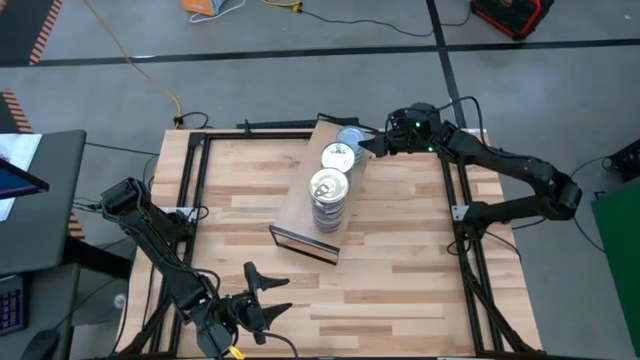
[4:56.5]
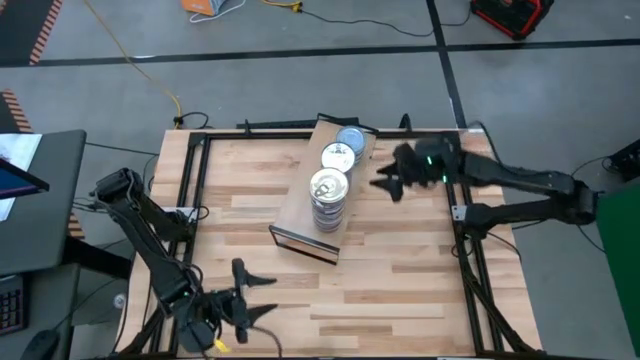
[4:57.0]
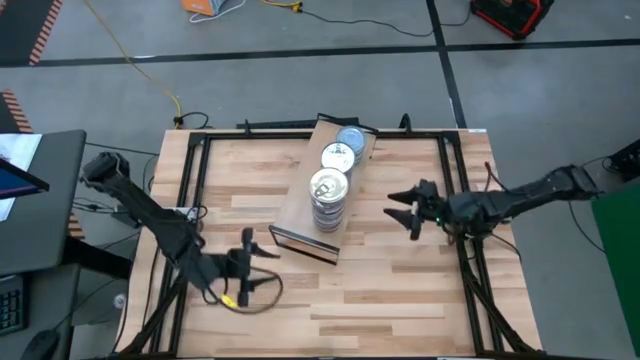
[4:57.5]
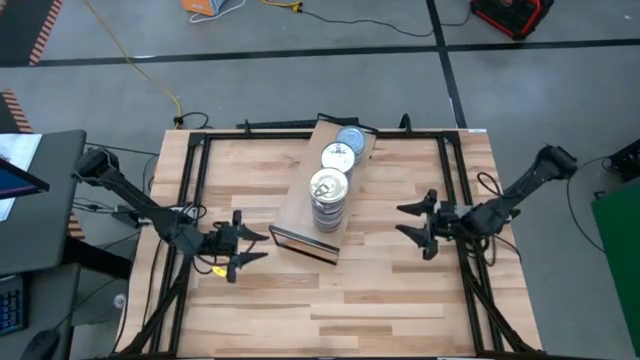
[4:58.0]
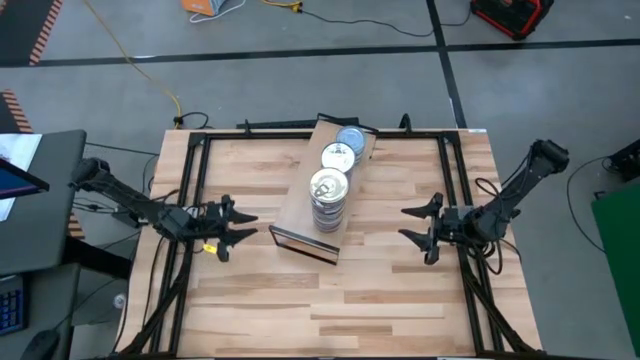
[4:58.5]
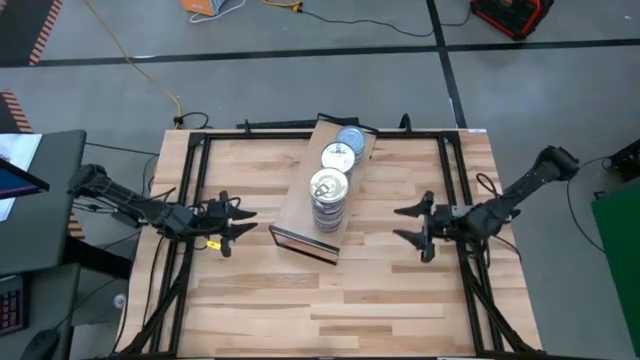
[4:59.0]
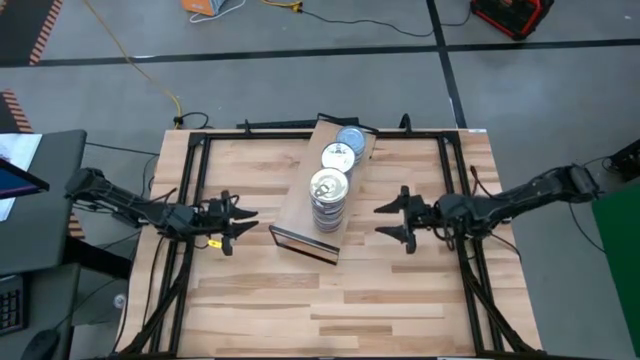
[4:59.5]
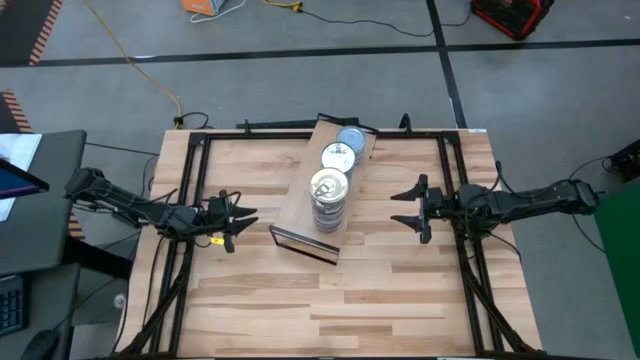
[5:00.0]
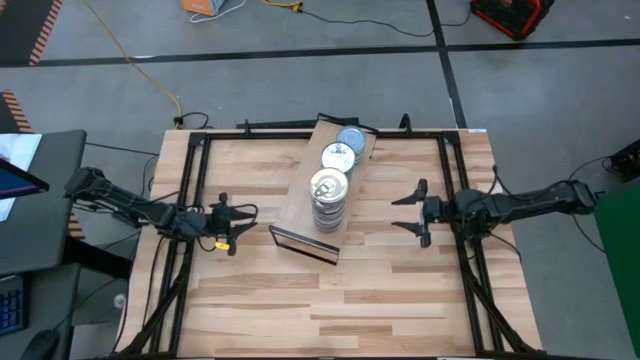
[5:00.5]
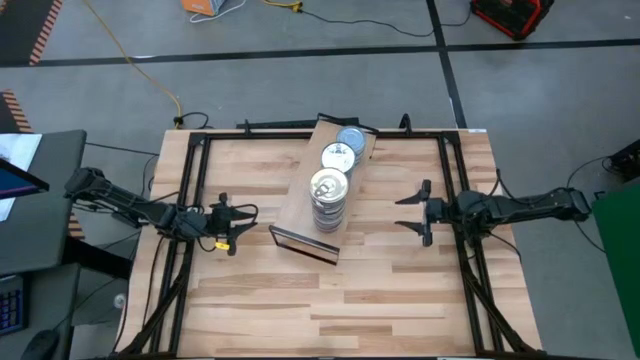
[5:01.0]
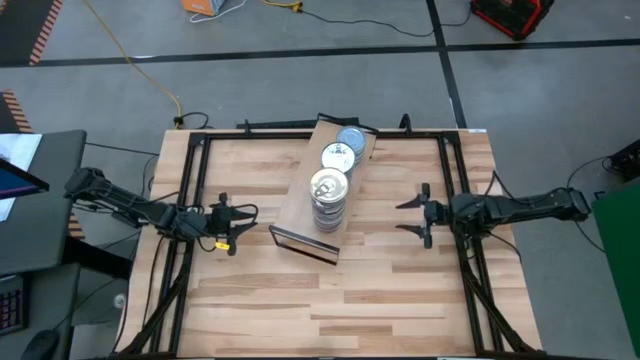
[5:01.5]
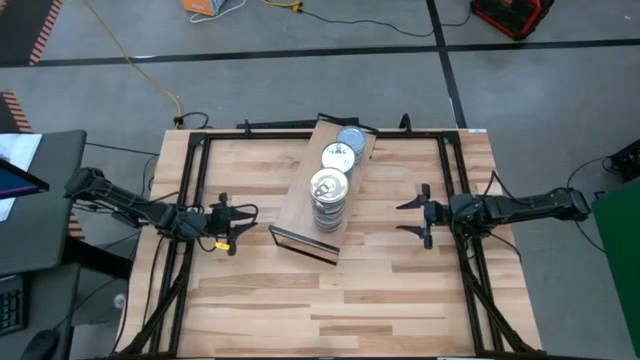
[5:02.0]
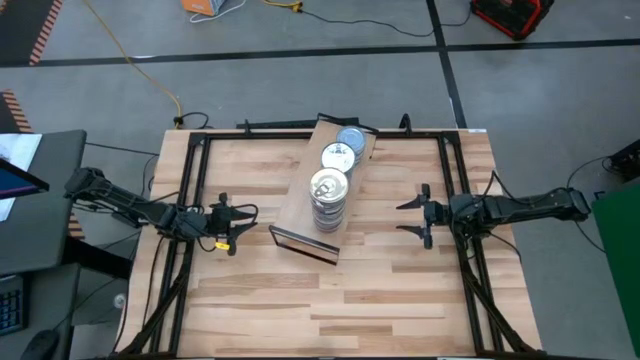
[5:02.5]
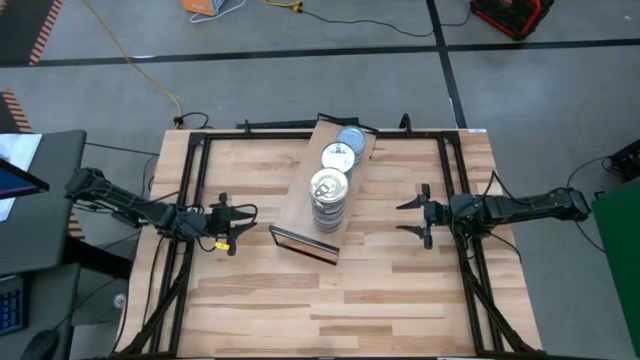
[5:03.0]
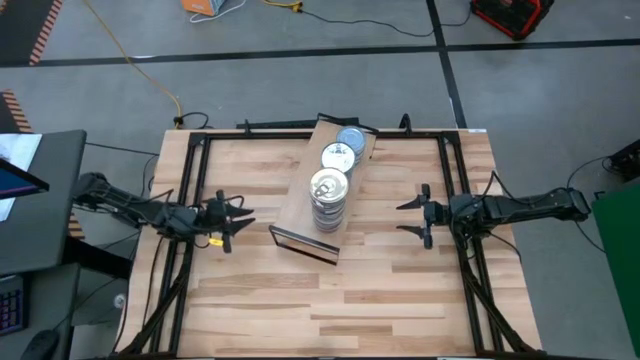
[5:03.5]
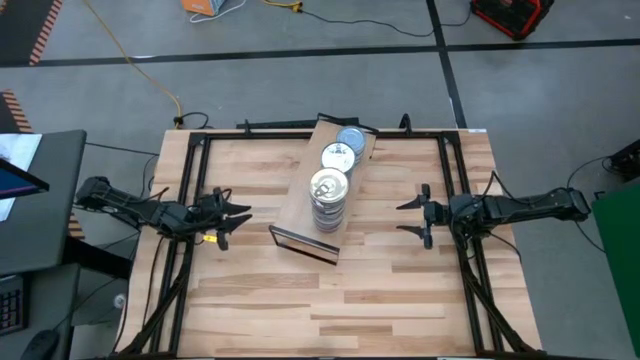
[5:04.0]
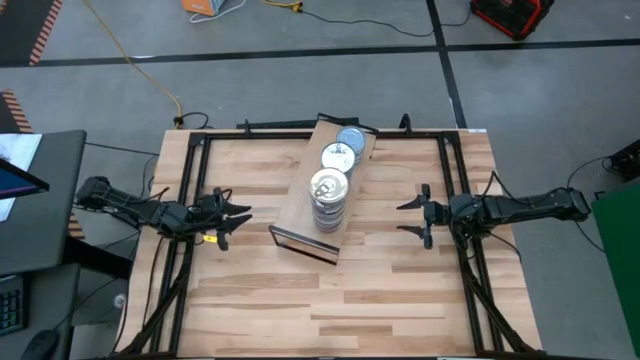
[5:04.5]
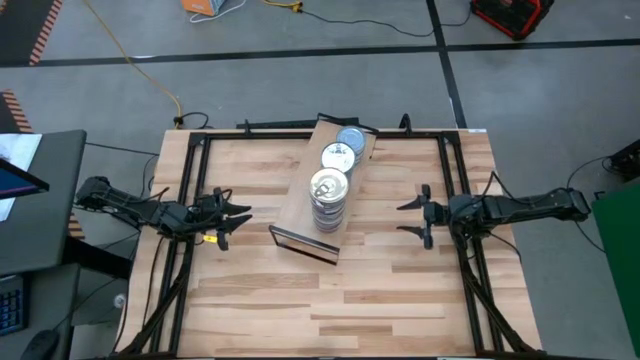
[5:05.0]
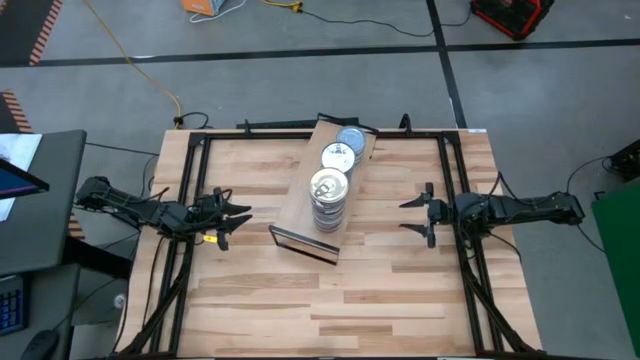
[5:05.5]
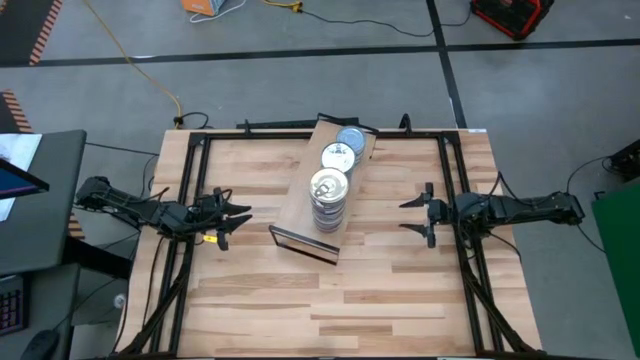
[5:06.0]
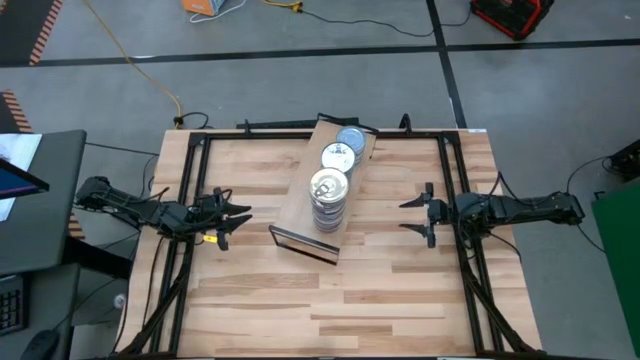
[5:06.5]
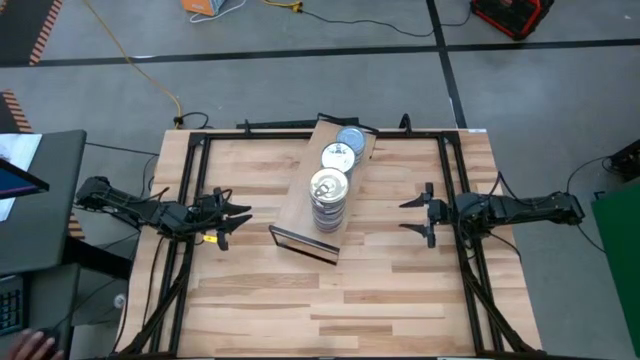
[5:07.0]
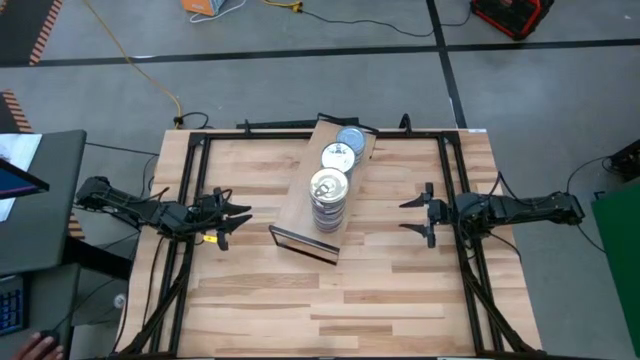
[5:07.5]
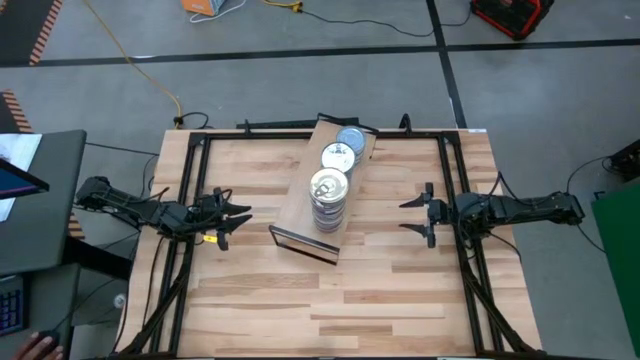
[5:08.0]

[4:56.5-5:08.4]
Task: Stack canned seafood by type on shelf
Return to Home Position

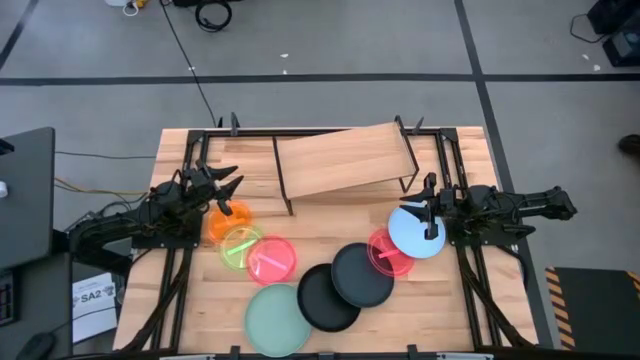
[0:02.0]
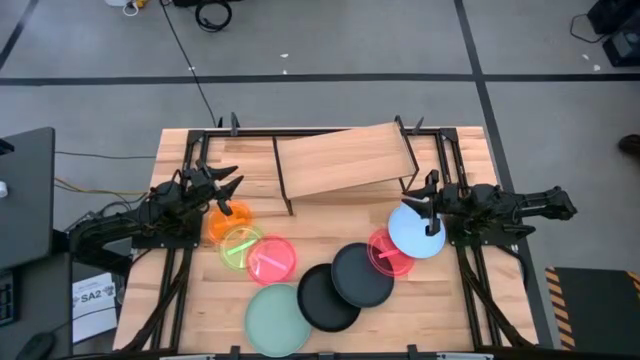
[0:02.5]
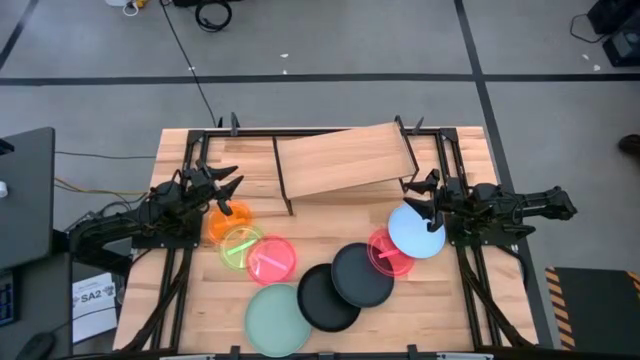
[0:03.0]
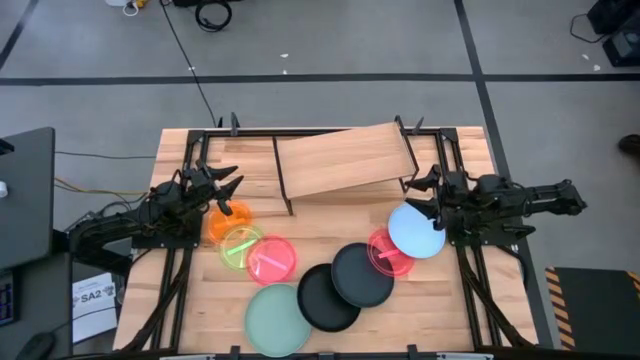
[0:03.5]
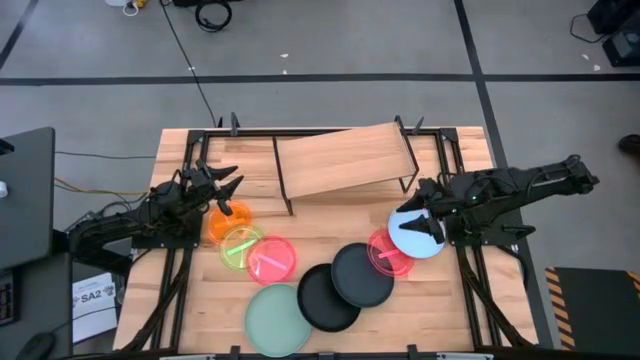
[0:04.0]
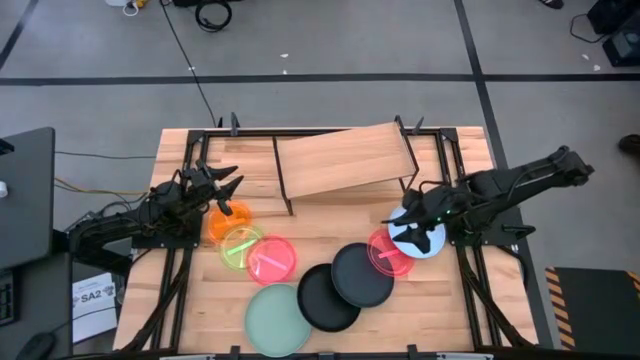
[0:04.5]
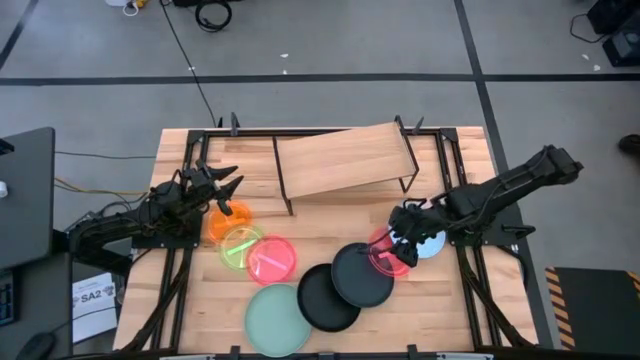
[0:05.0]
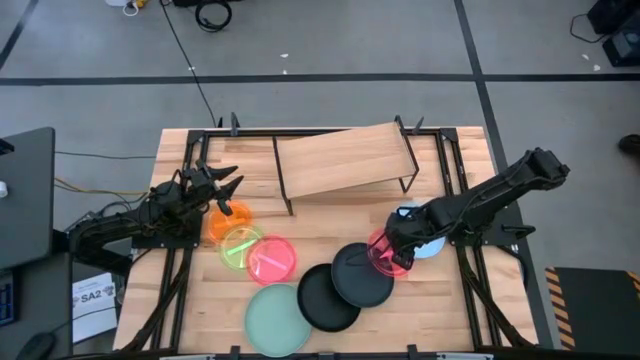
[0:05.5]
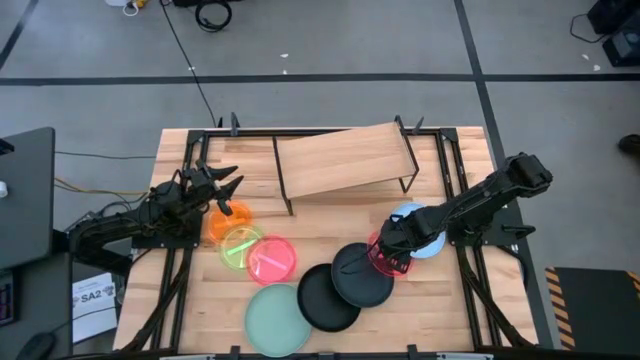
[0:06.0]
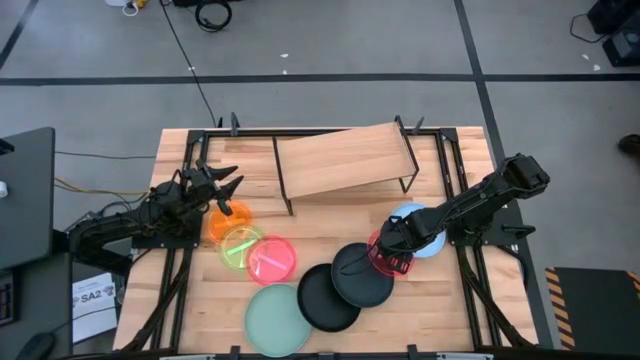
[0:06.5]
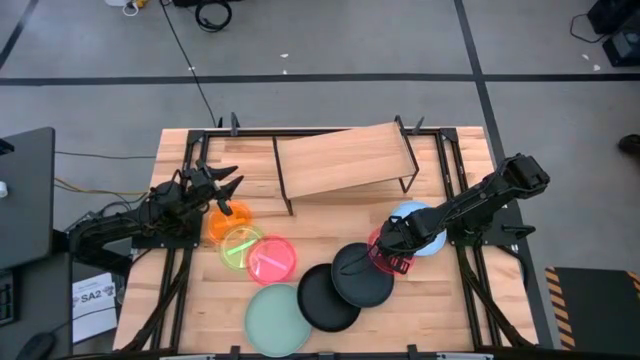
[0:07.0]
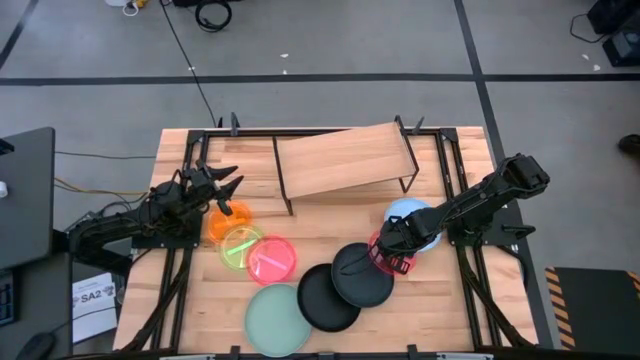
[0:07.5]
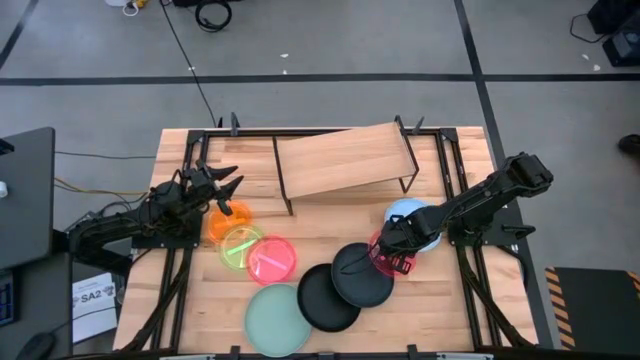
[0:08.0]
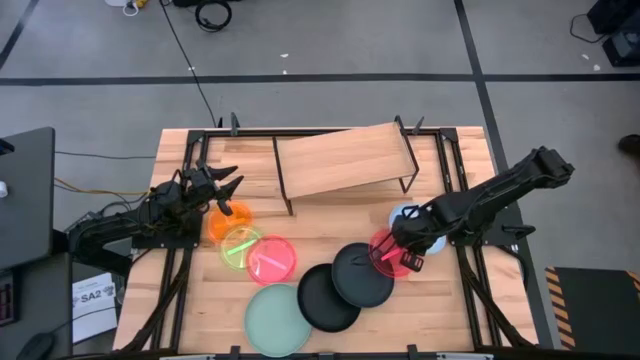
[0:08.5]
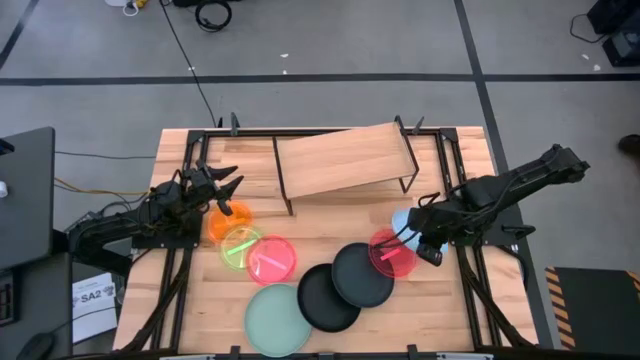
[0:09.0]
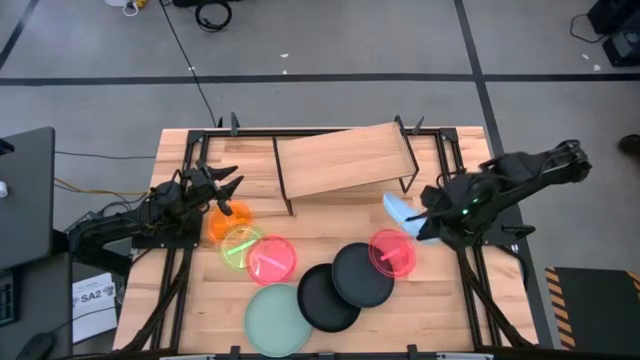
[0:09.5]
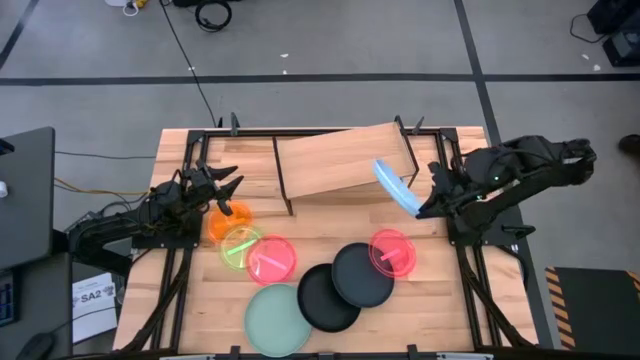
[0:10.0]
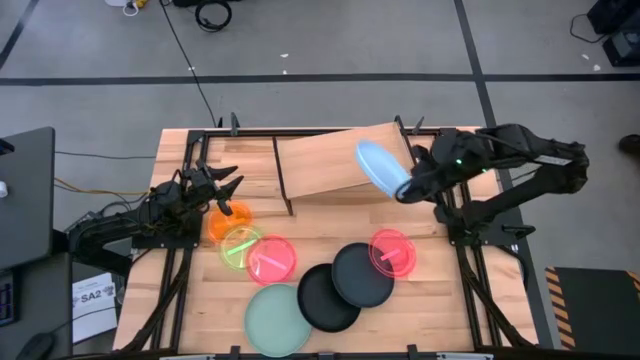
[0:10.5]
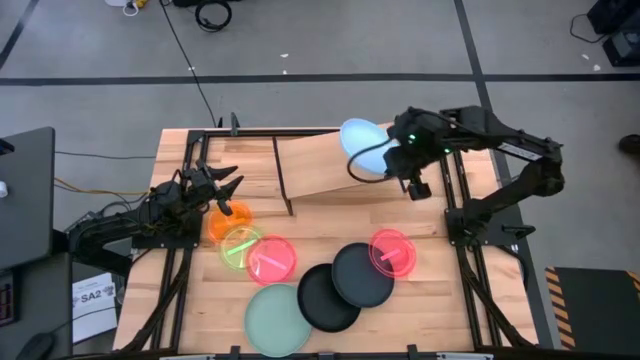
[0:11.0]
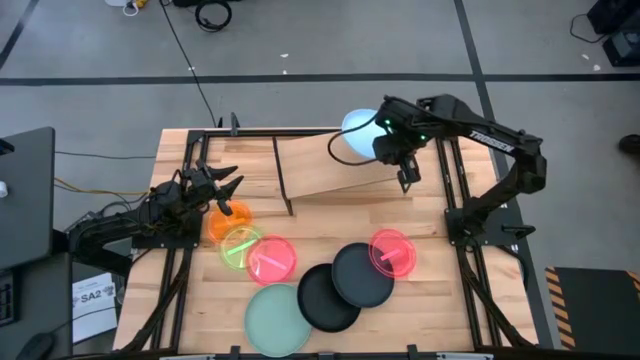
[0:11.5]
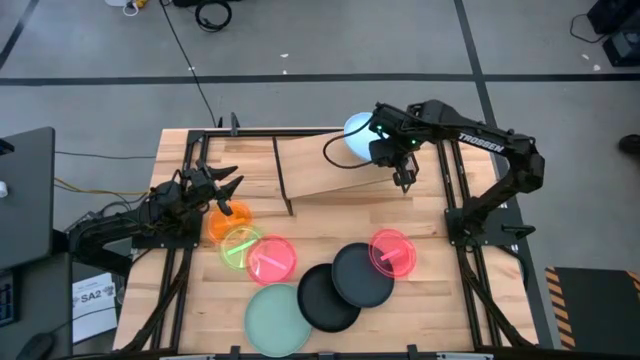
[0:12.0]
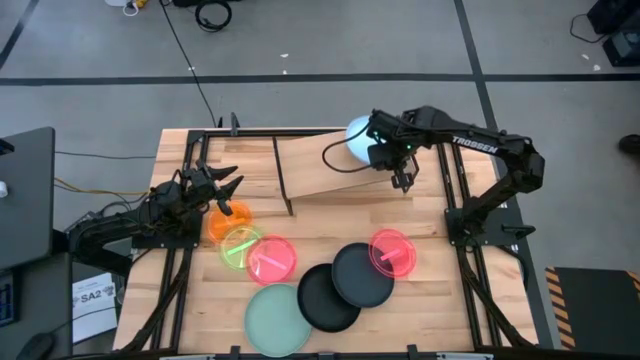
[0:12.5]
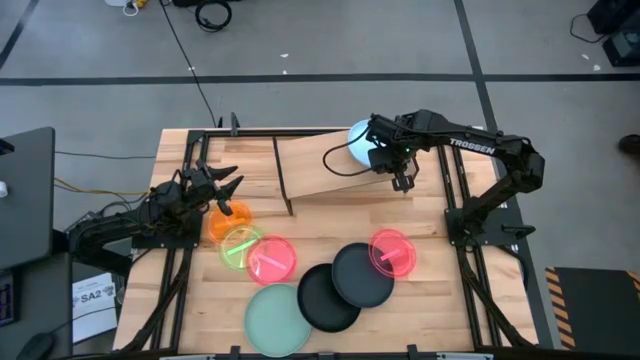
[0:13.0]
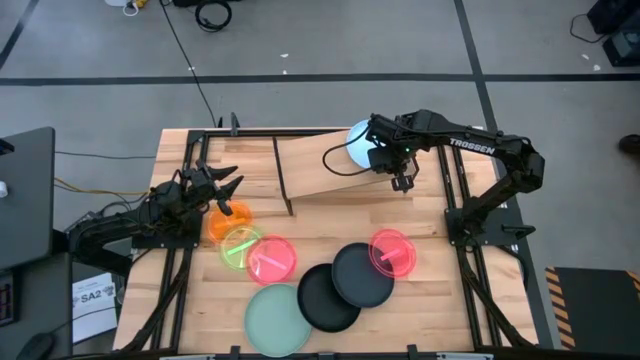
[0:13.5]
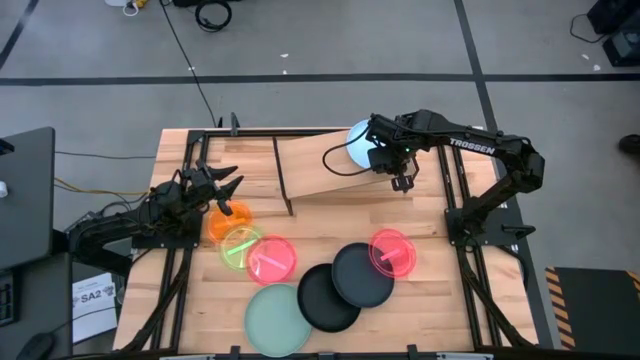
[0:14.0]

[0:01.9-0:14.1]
Task: Place and stack plates onto a shelf
Put the large blue plate on the shelf
